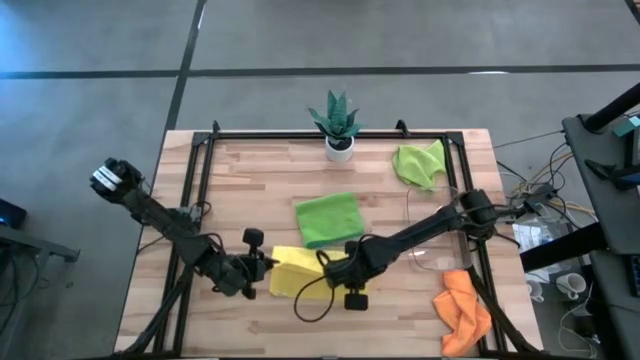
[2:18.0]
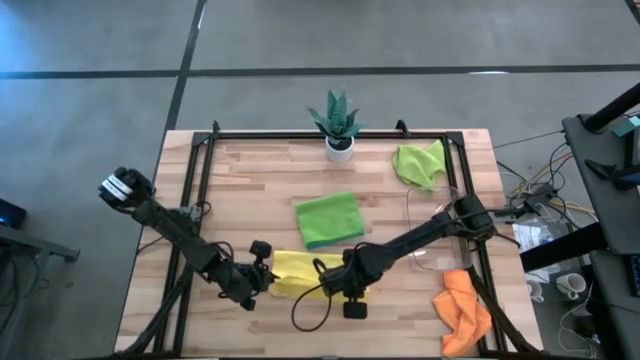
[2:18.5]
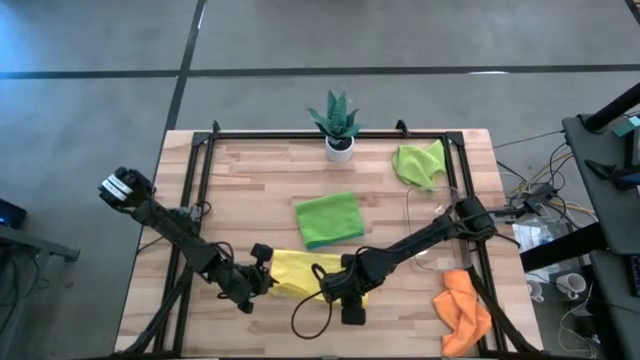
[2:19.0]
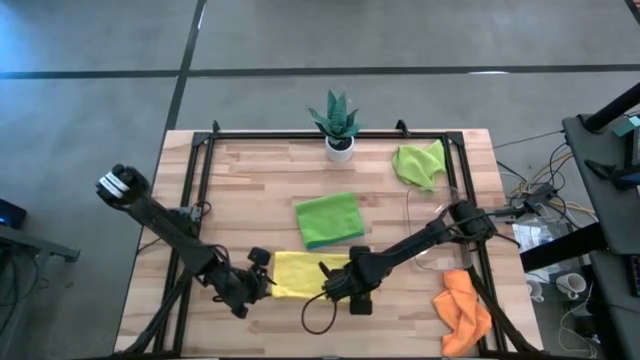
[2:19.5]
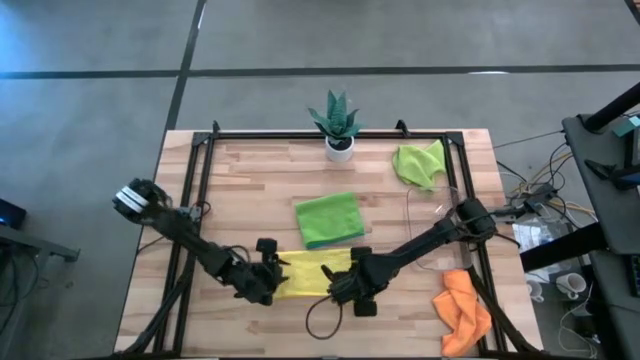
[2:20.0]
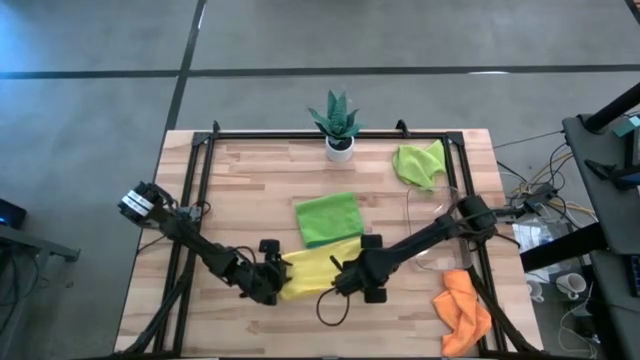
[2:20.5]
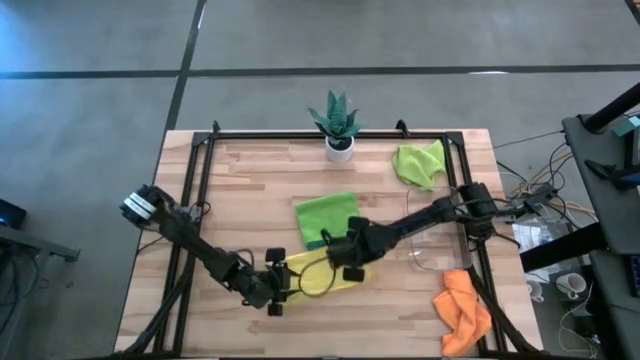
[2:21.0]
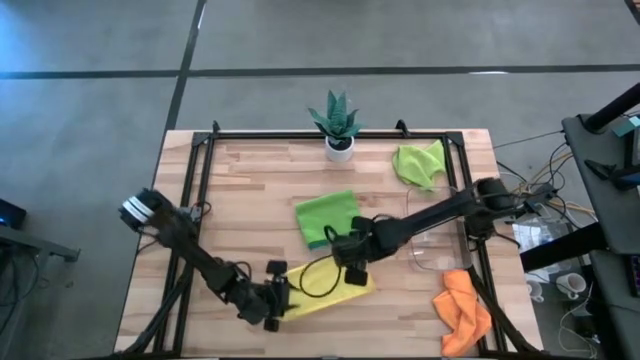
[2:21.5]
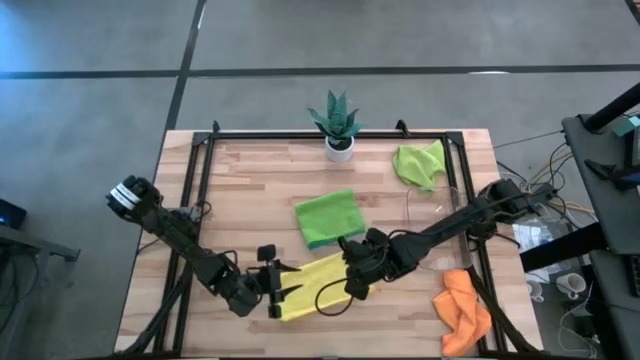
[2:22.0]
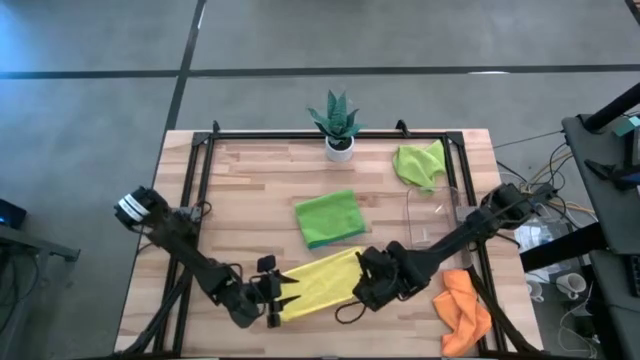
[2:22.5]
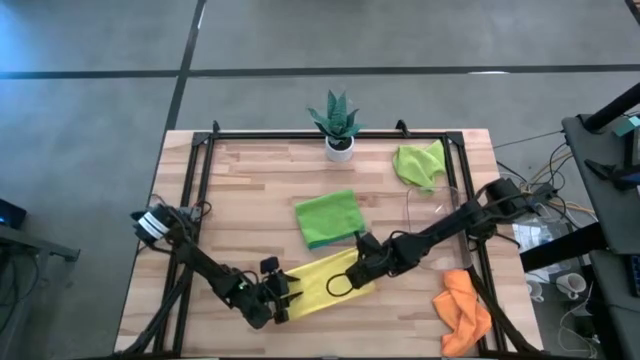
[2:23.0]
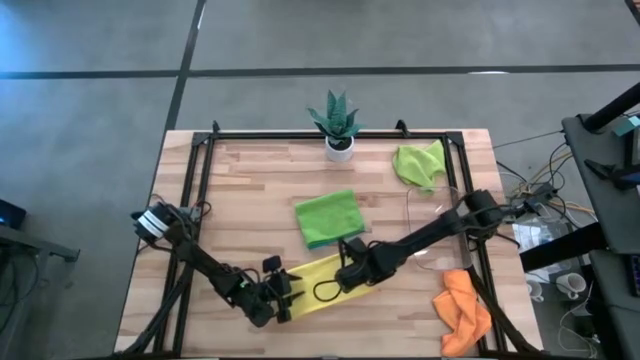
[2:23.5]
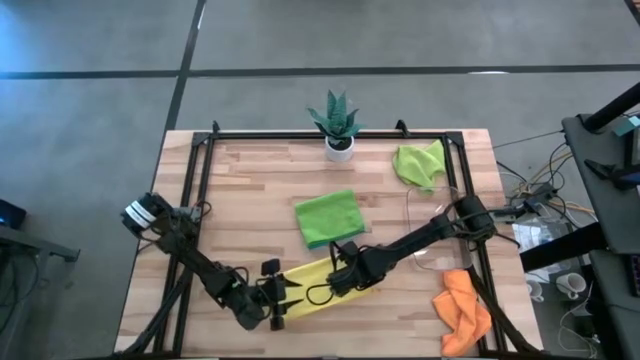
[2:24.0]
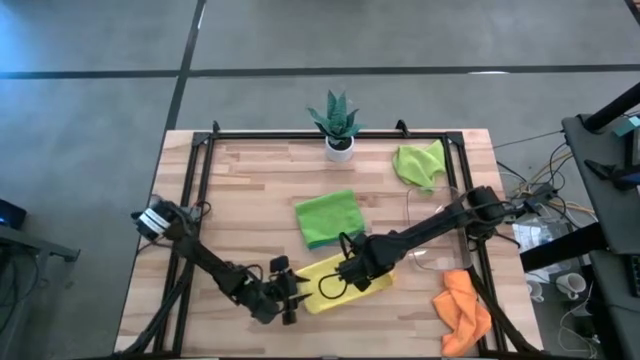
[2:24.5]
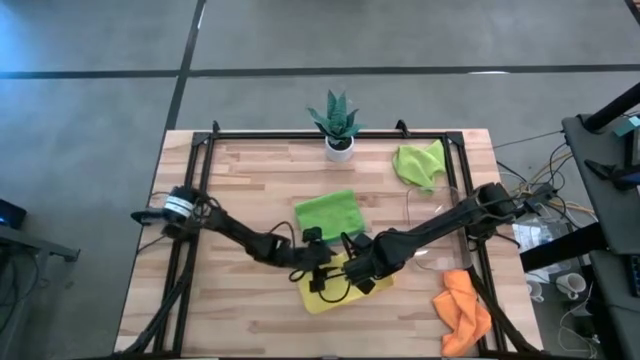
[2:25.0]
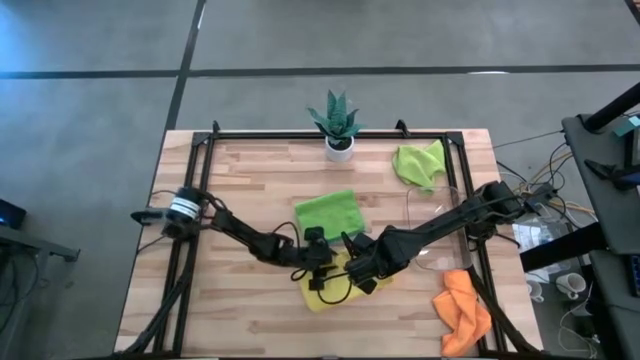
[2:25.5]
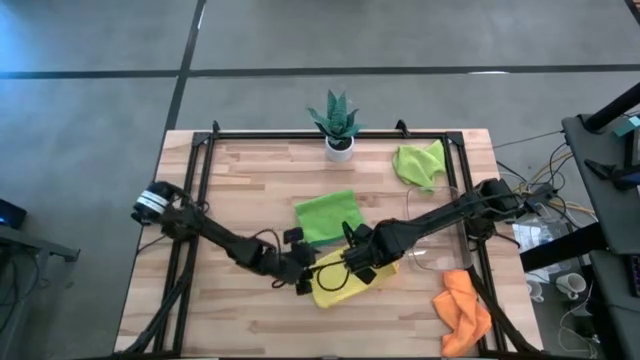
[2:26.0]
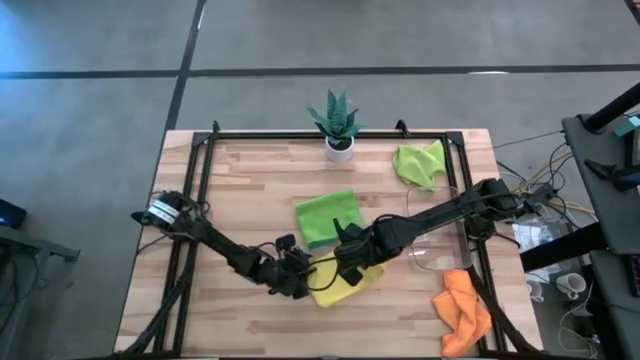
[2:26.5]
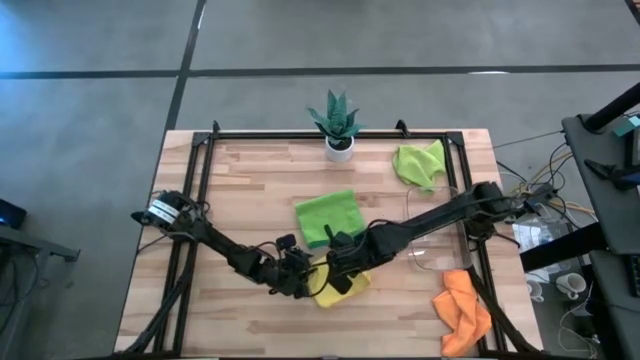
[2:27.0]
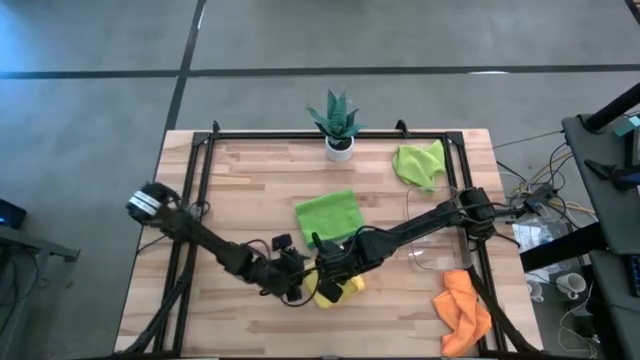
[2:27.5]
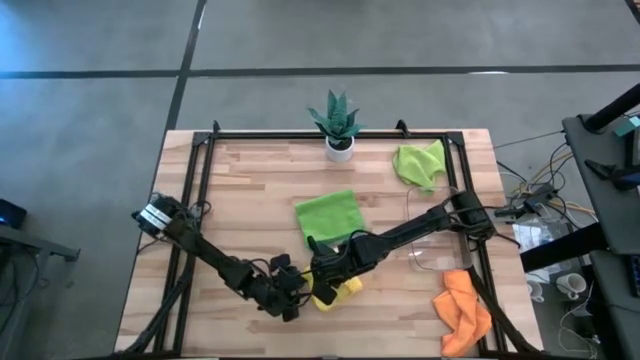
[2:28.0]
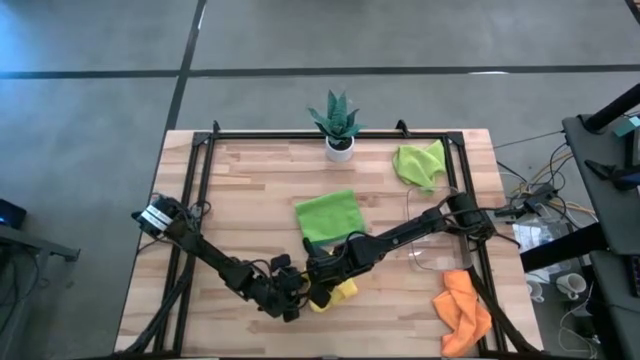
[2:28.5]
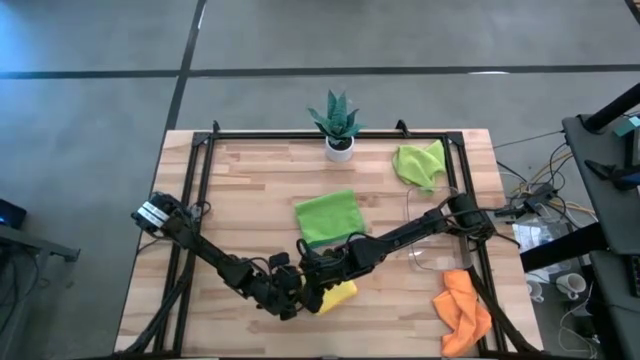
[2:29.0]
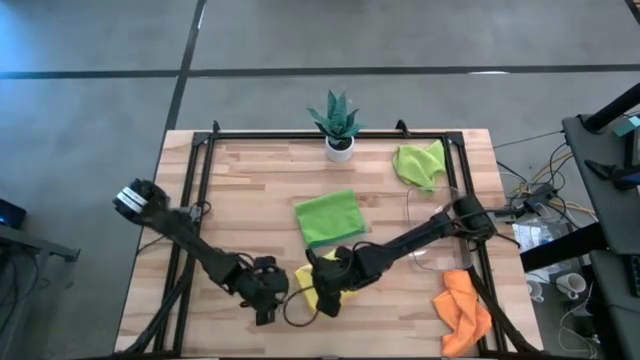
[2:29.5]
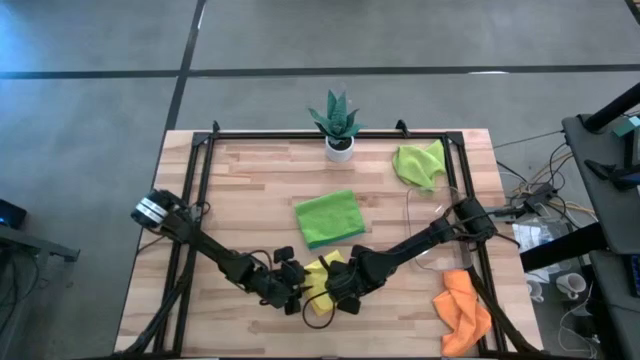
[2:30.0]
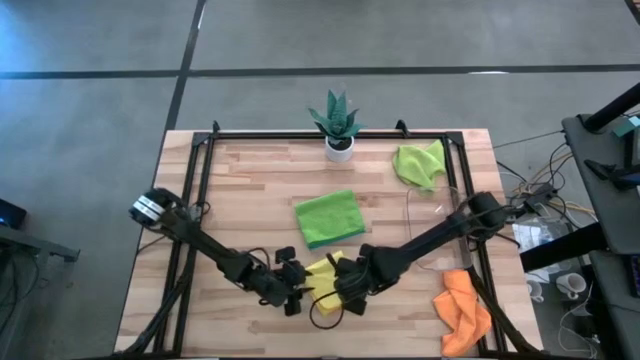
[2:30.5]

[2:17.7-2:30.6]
Task: Fold microfiber towels
Fold the yellow towel on the table

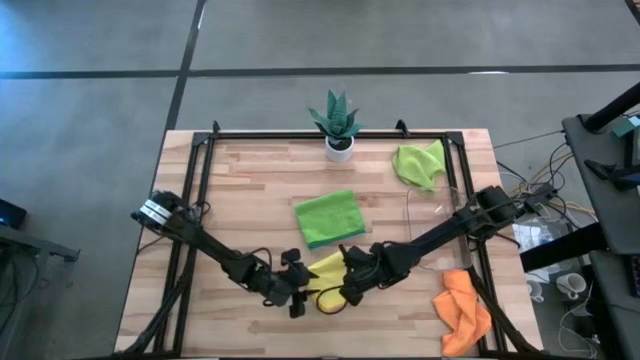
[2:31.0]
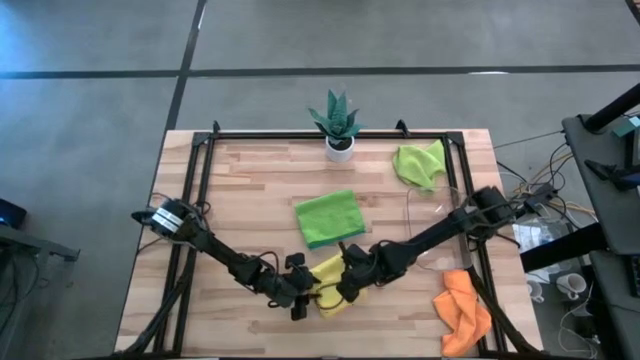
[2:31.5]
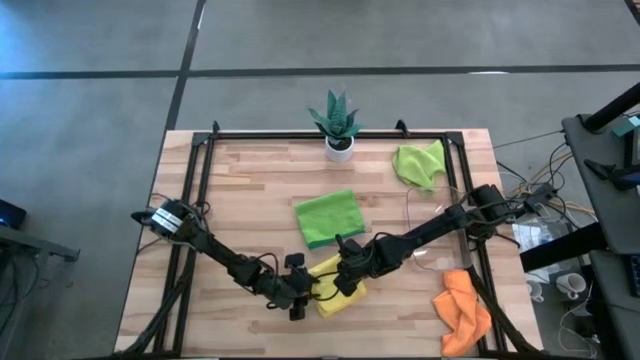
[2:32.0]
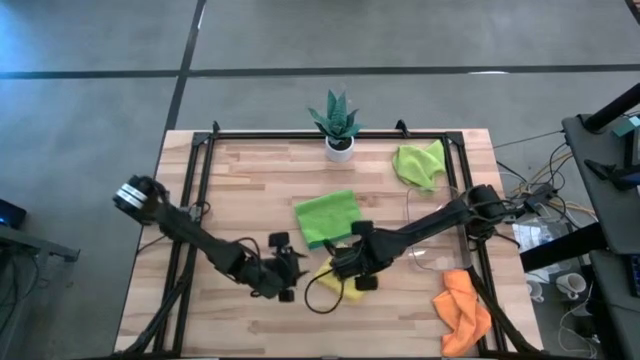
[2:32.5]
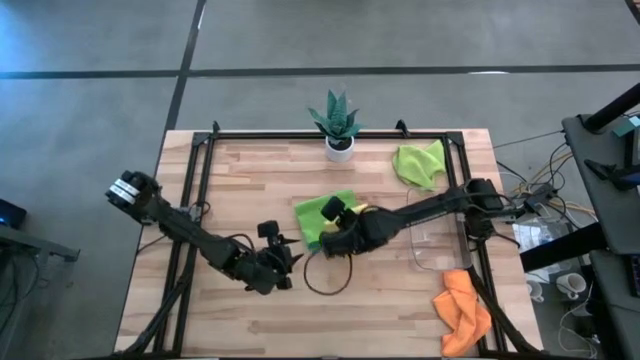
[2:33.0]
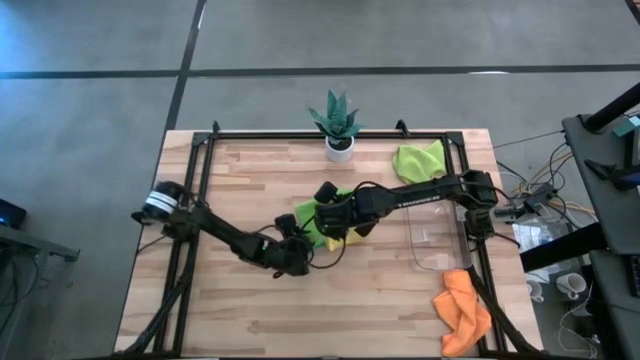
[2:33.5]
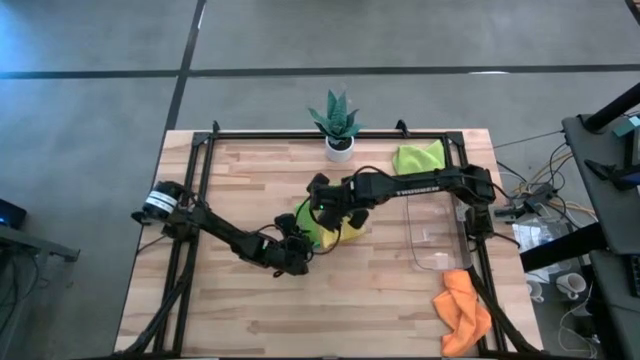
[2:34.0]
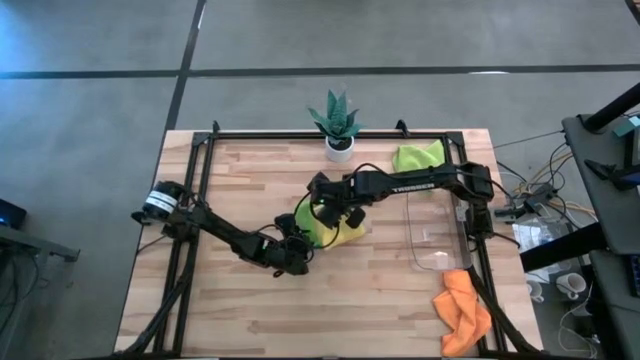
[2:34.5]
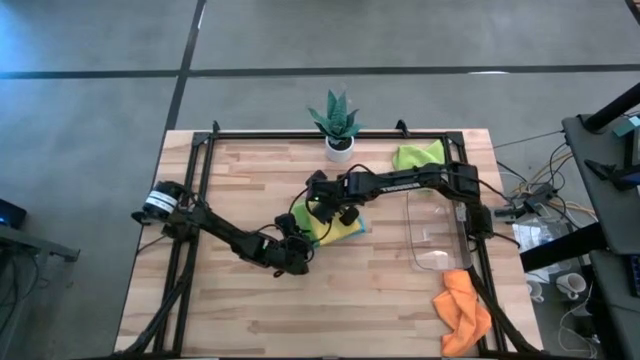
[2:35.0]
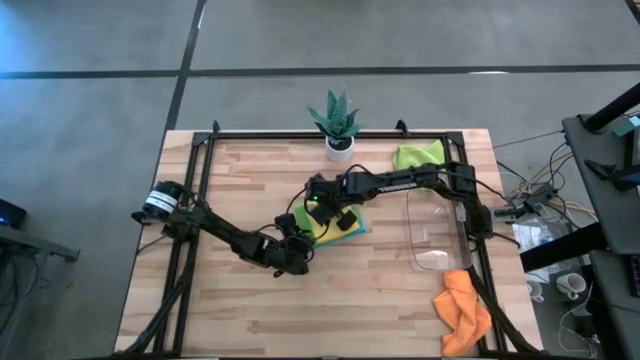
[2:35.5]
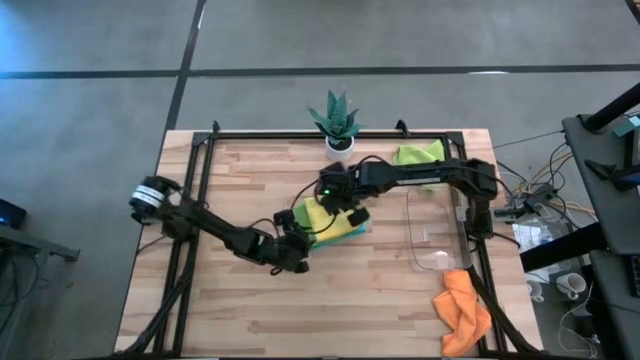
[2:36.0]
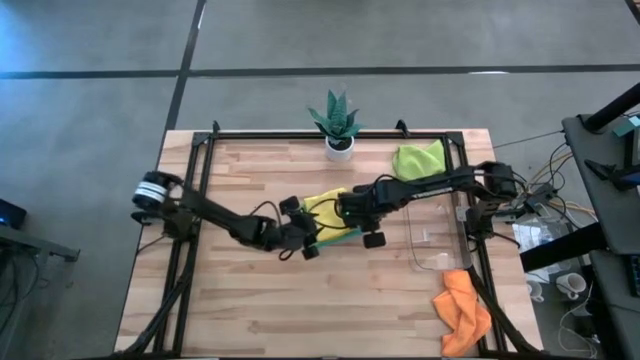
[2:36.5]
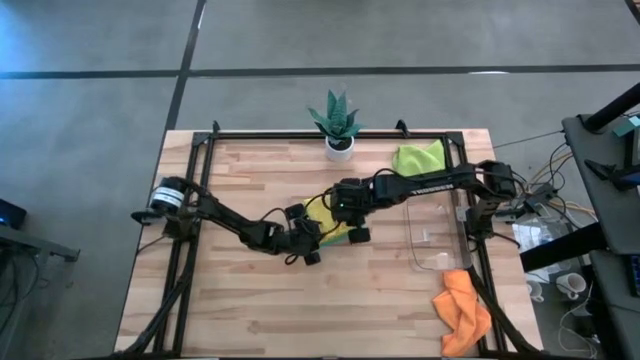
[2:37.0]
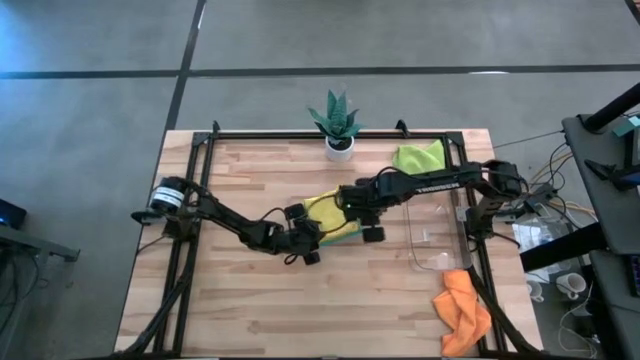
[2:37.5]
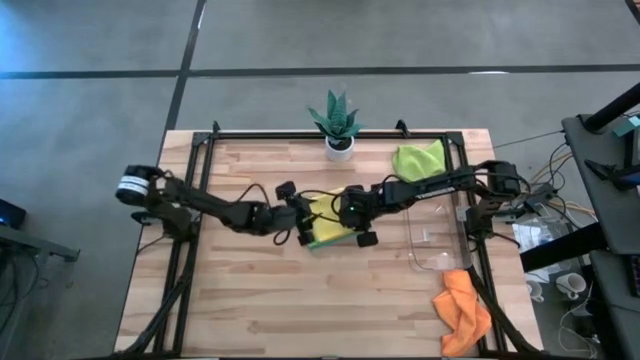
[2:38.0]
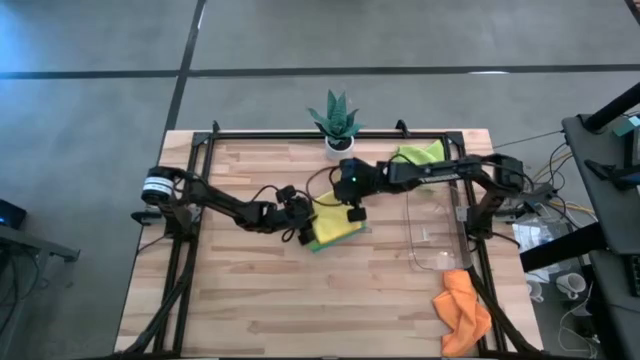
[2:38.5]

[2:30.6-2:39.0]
Stack the yellow towel on top of the green towel

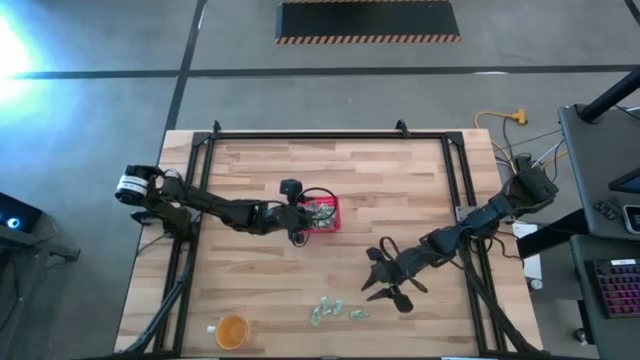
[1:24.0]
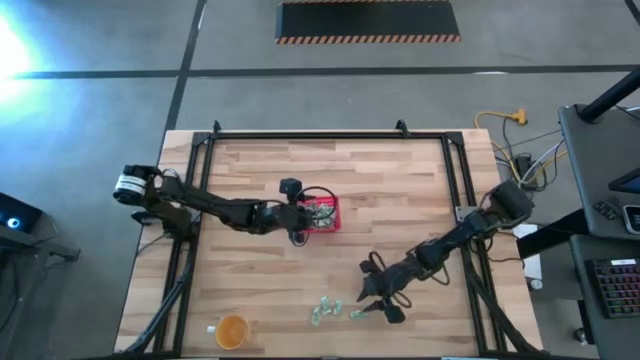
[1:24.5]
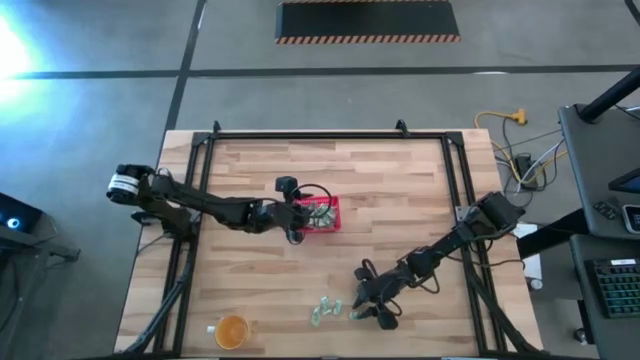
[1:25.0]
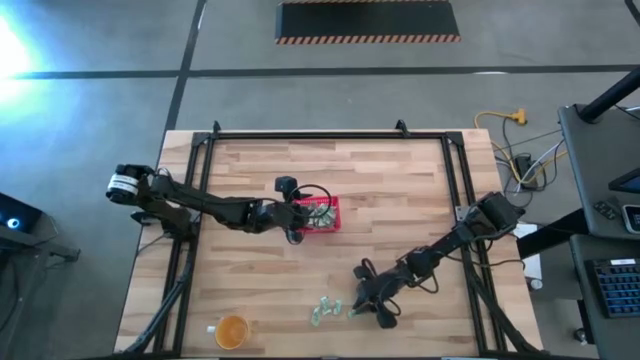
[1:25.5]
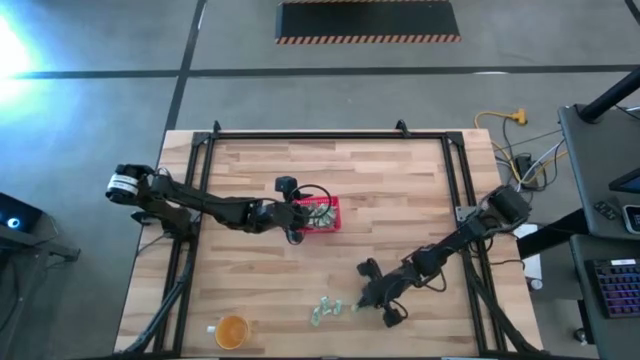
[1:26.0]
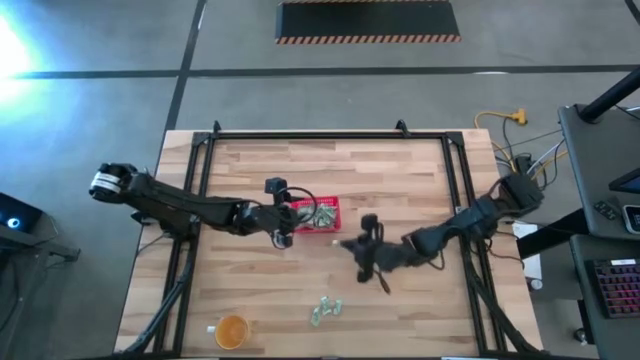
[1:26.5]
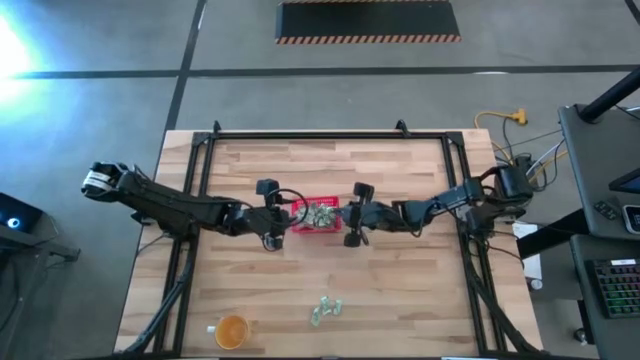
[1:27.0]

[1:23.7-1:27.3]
Task: Pick and place items into bin
Put the stevia packet into the red bin
